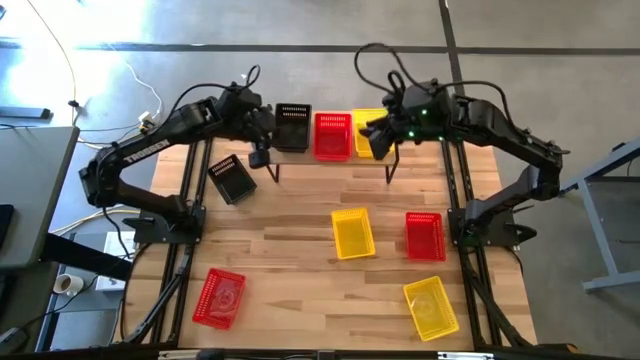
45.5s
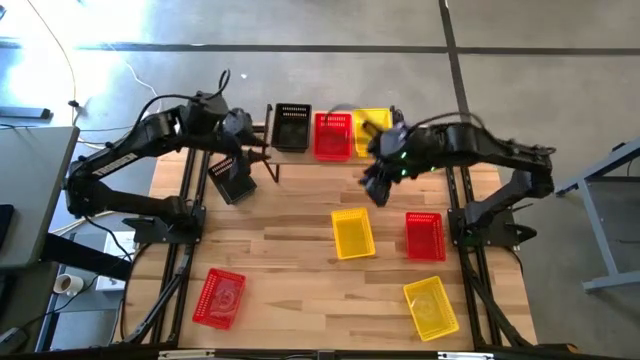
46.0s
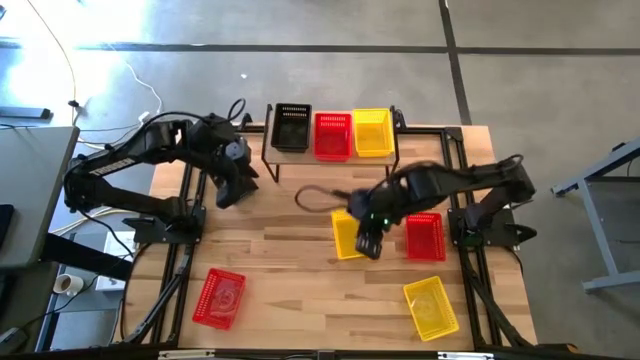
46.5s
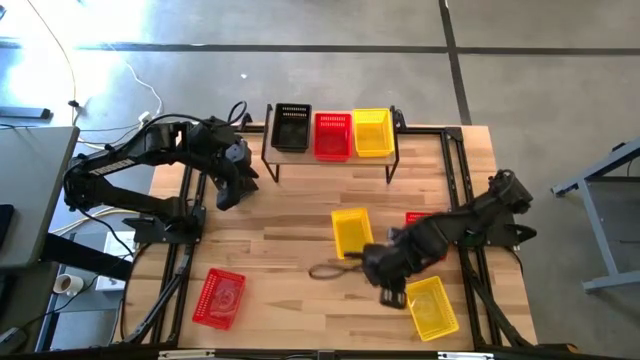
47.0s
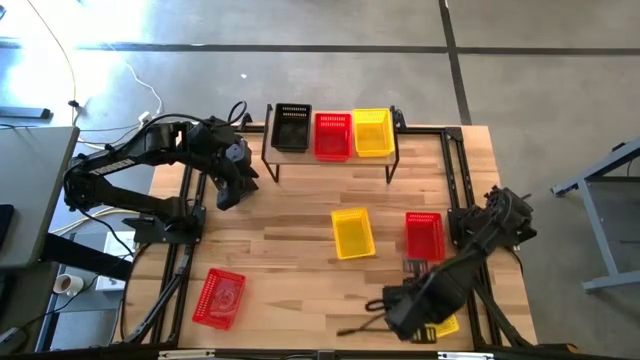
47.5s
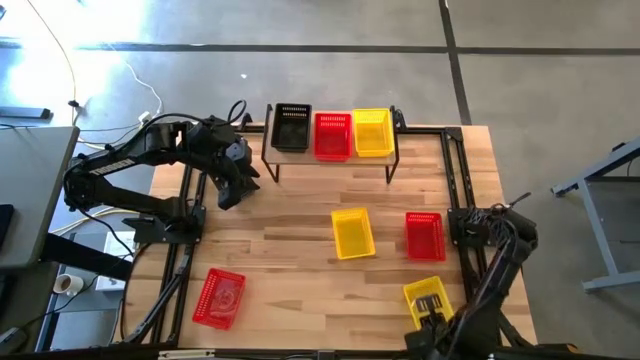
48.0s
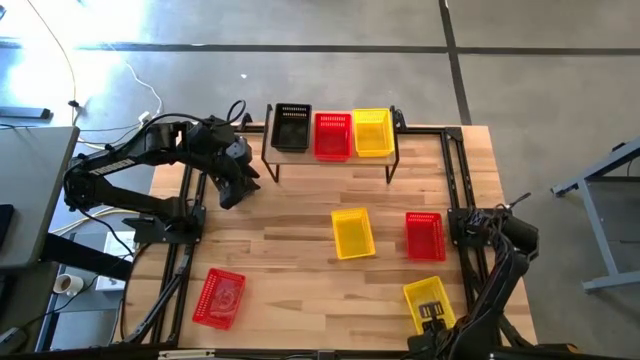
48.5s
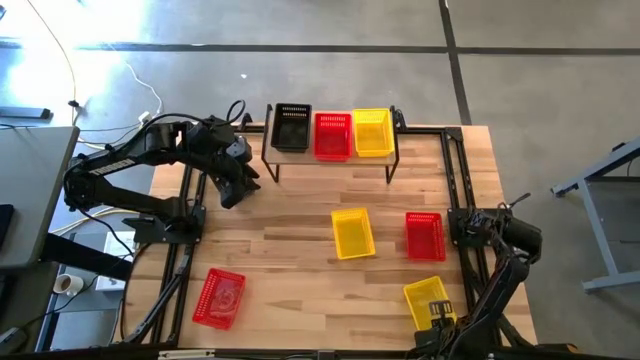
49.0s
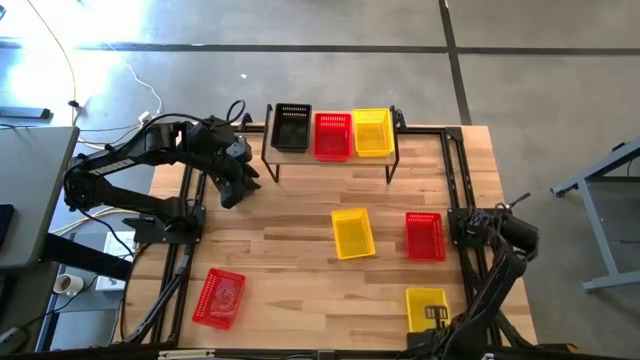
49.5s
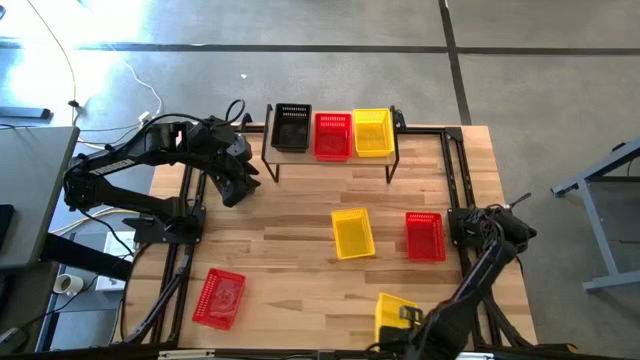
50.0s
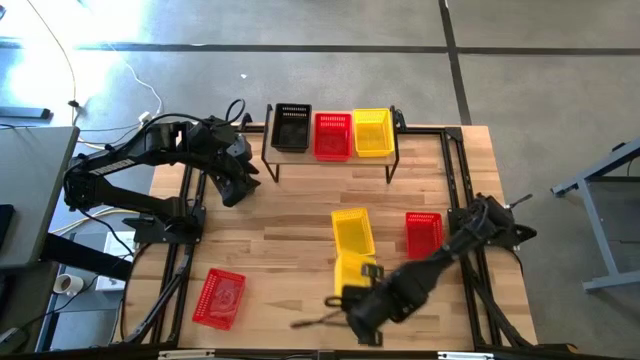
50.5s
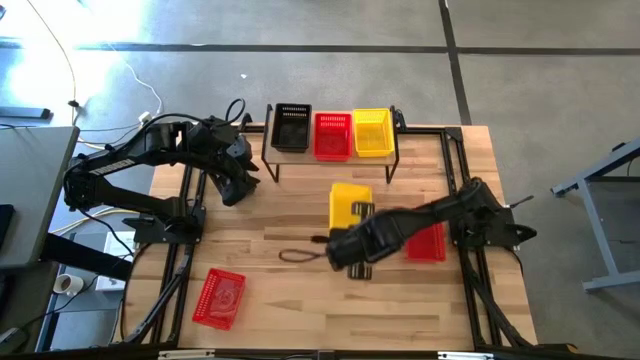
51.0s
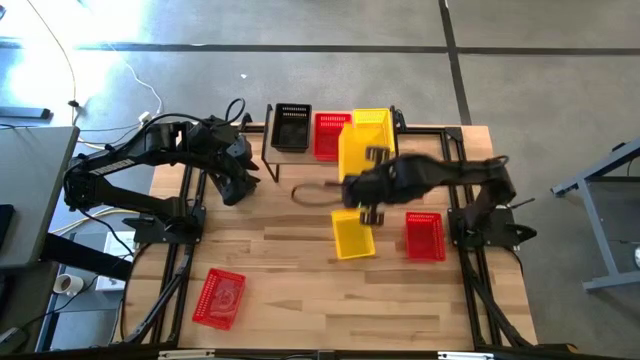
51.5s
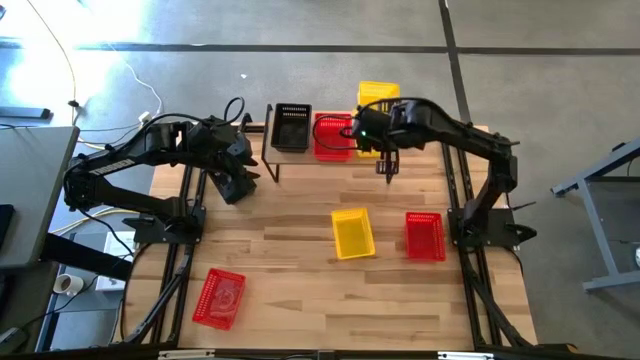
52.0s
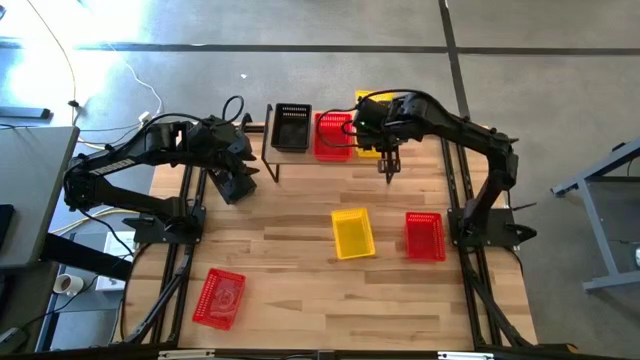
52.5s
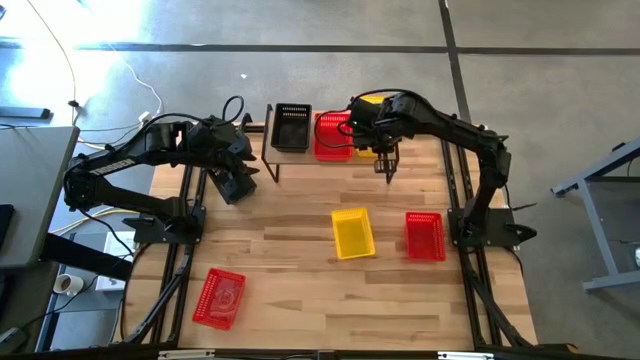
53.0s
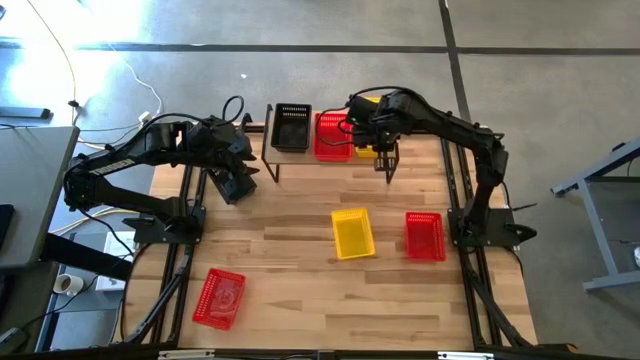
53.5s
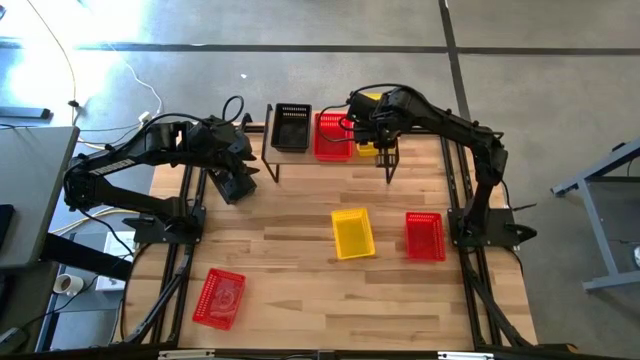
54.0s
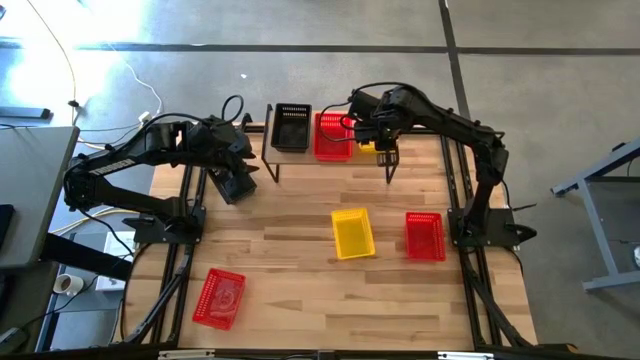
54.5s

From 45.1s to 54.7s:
Task: Stack baskets on shelf by color
Stack the bottom yellow basket on top of the yellow basket on the shelf

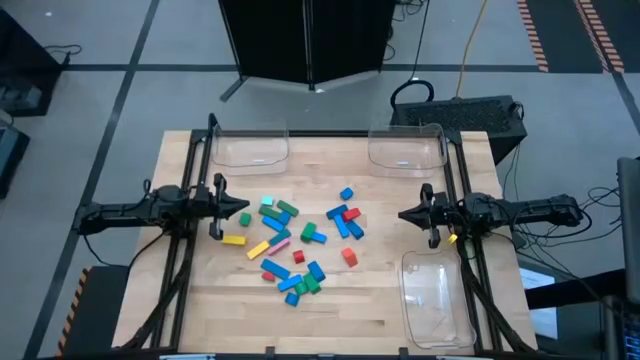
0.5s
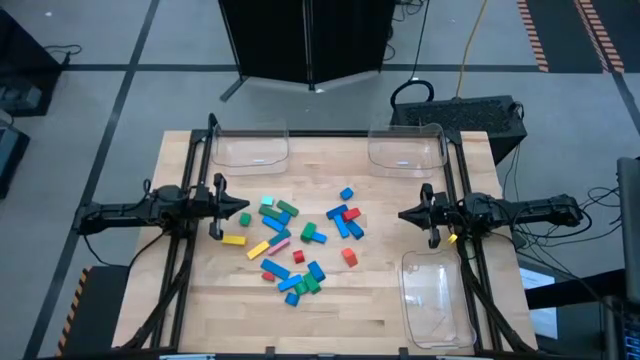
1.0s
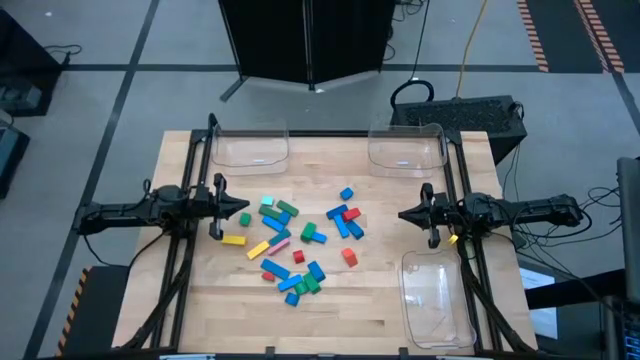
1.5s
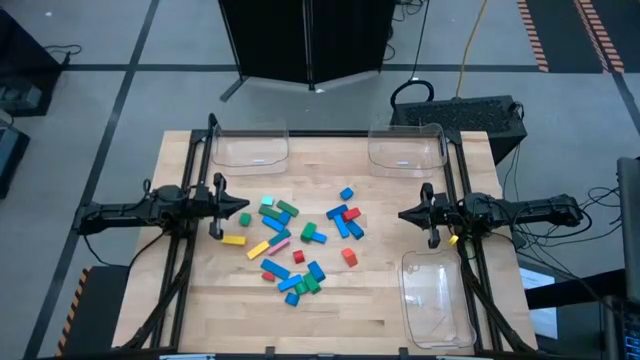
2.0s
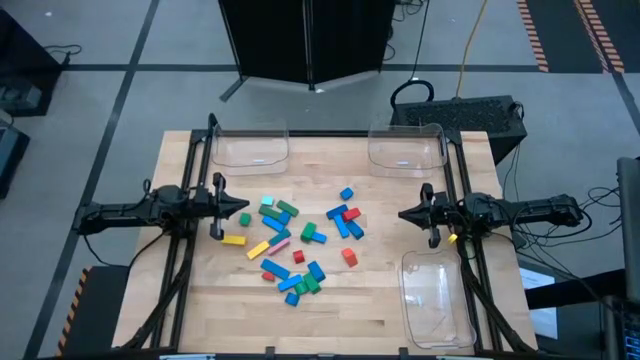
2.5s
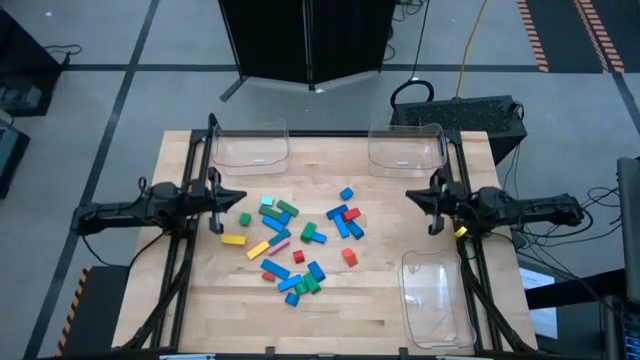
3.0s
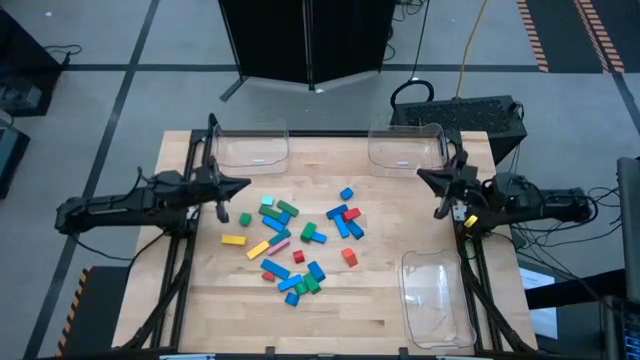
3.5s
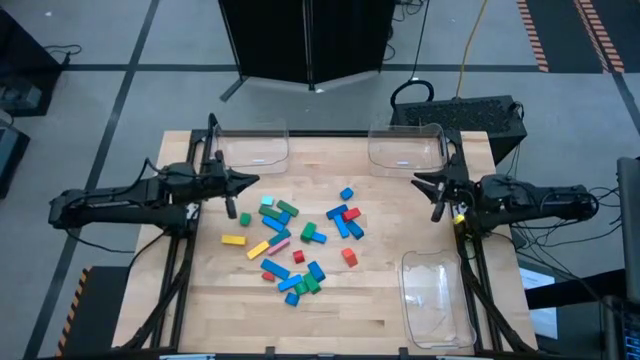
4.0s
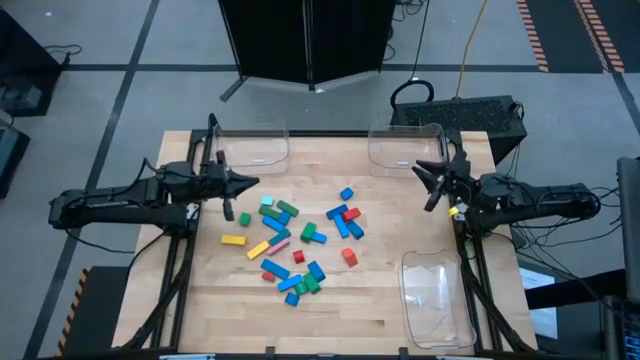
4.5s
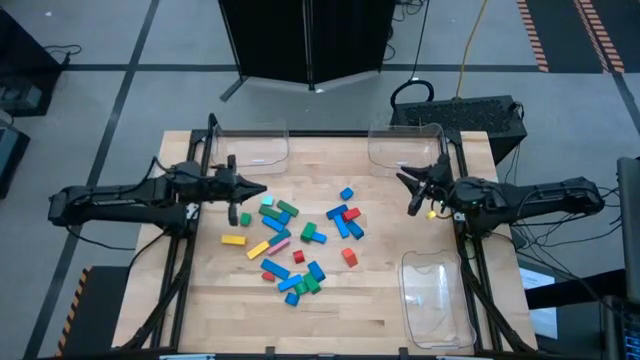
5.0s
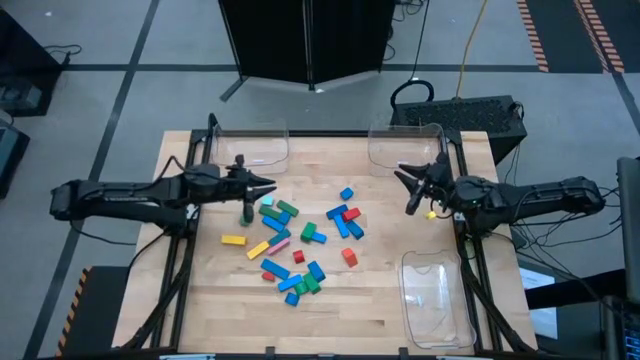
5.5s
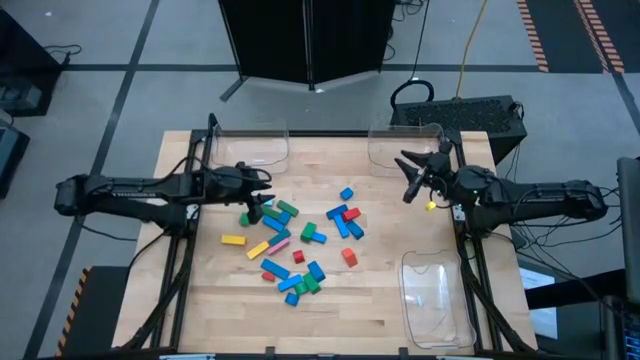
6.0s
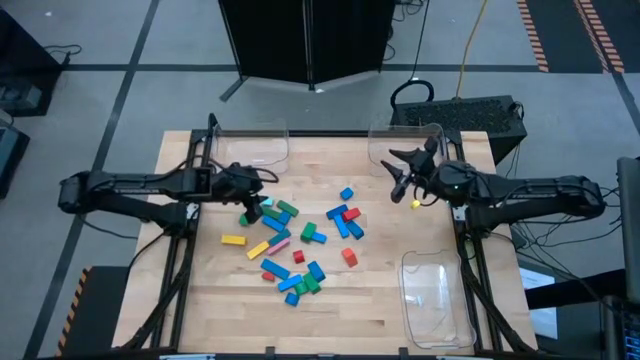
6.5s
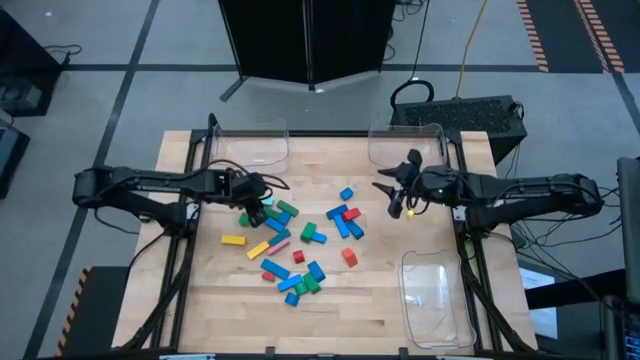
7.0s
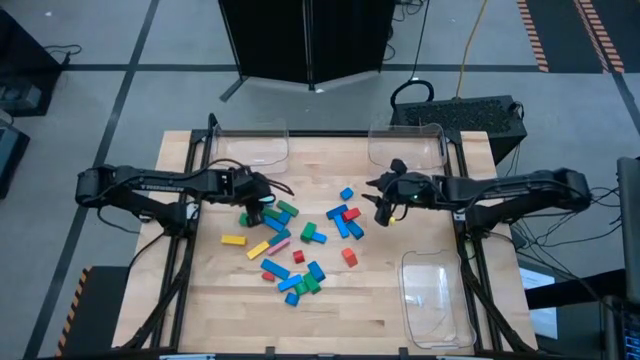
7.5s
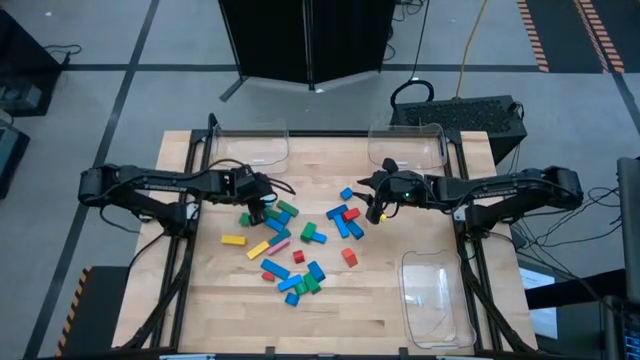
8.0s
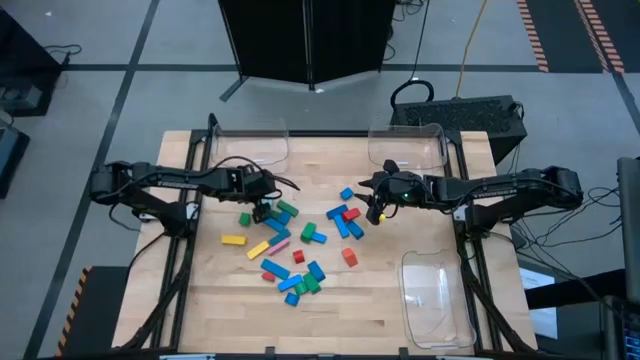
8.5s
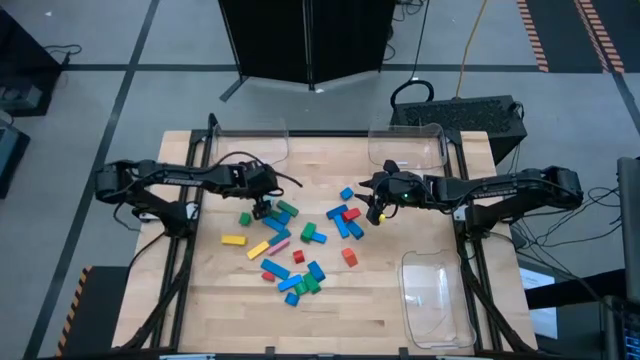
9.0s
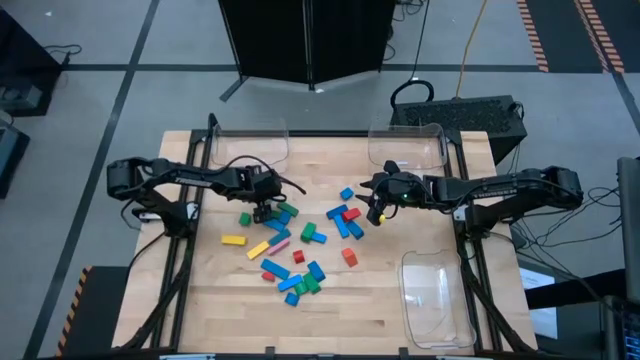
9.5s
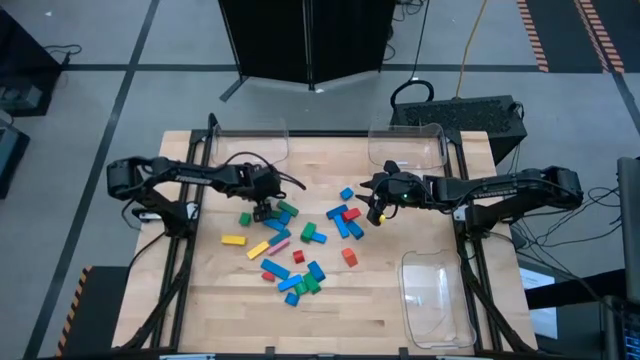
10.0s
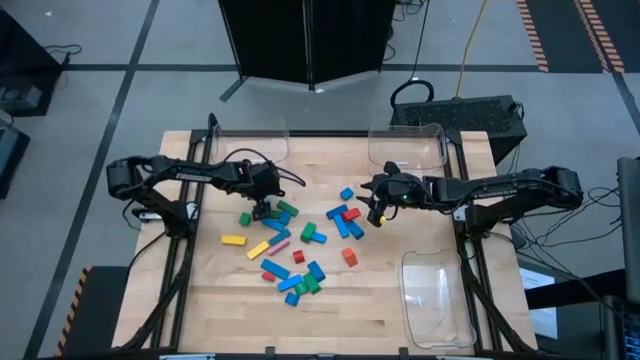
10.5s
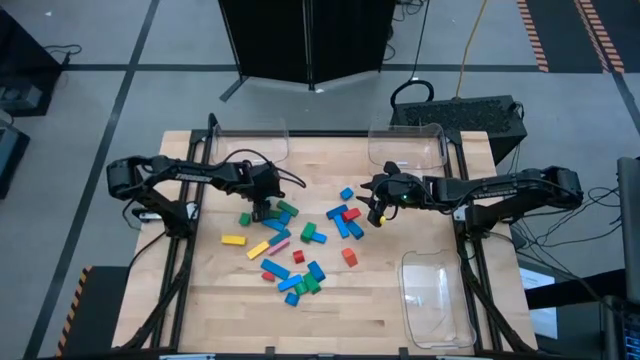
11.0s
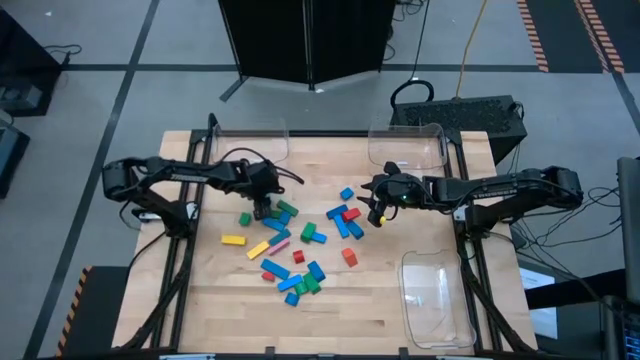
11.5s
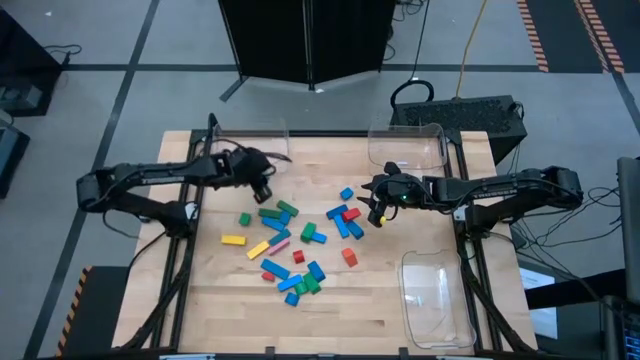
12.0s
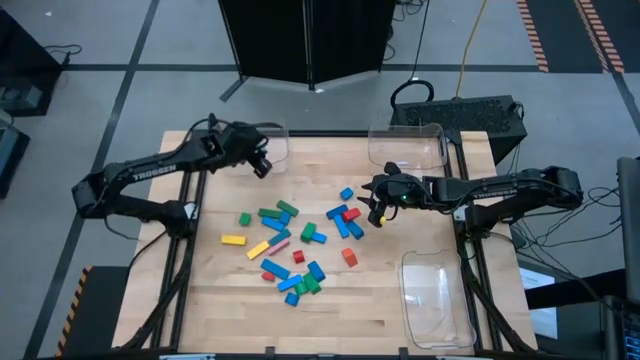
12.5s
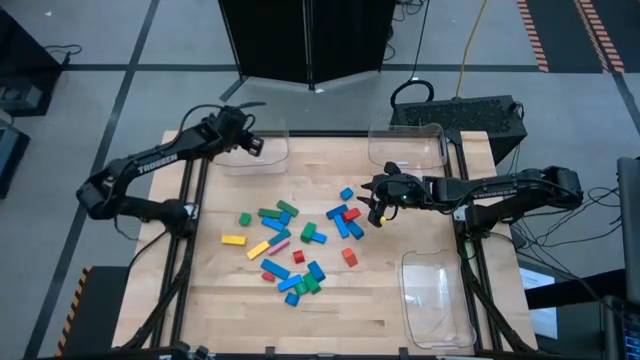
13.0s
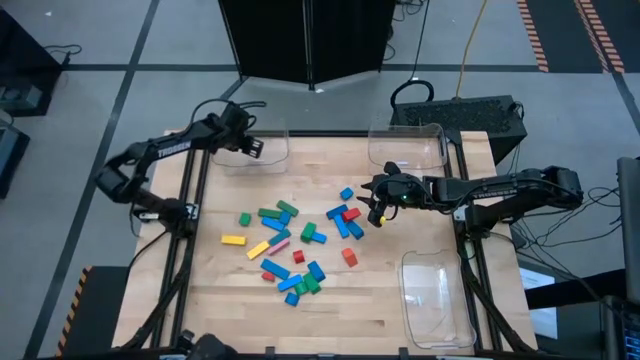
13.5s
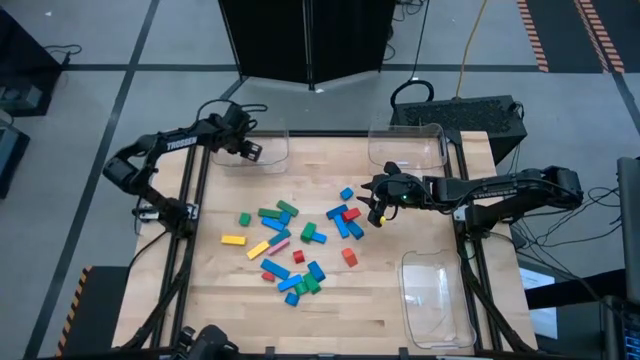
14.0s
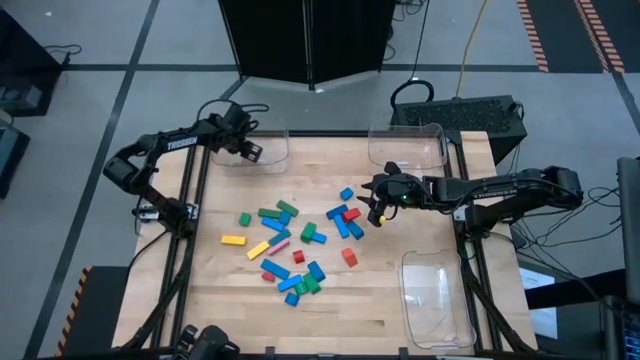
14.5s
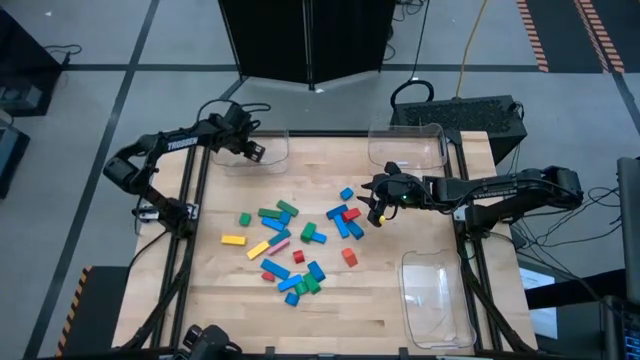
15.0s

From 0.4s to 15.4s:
Task: Sort blocks by size
Put the light blue half-circle block into the top left transparent bin
